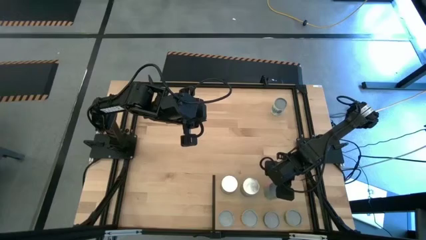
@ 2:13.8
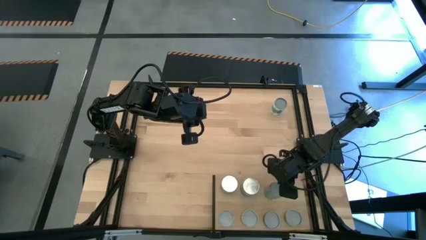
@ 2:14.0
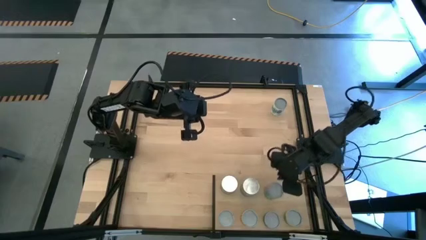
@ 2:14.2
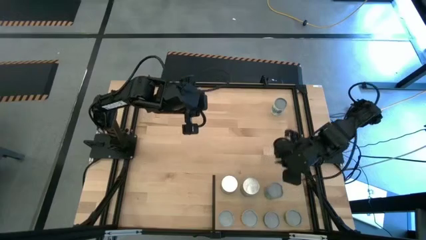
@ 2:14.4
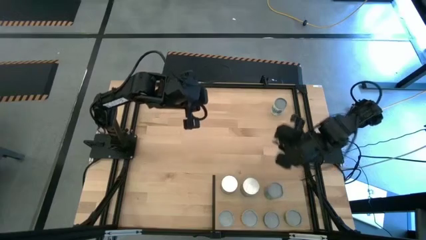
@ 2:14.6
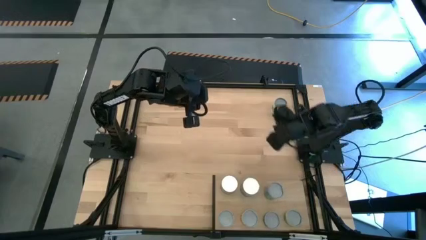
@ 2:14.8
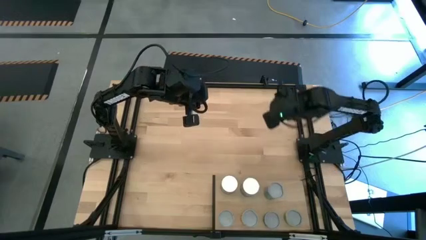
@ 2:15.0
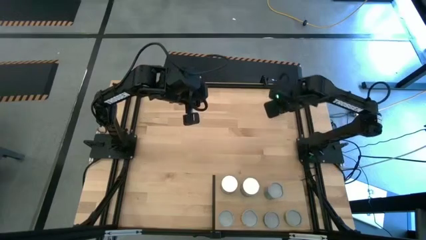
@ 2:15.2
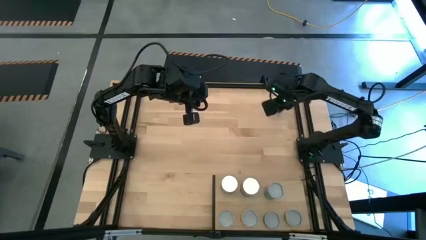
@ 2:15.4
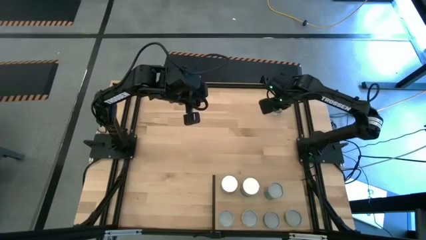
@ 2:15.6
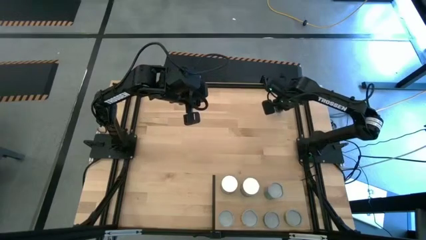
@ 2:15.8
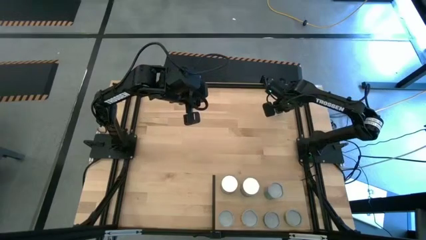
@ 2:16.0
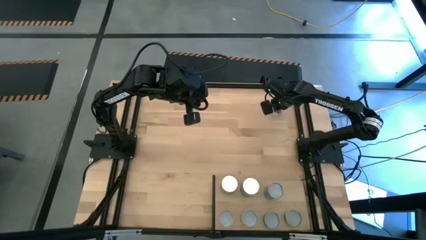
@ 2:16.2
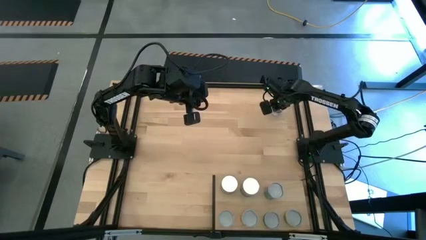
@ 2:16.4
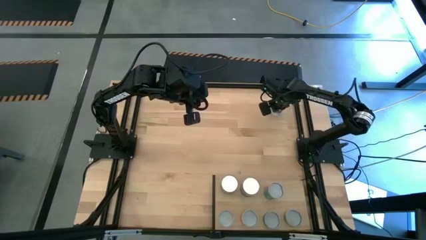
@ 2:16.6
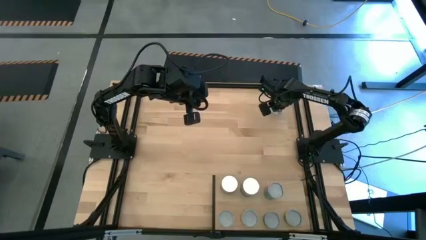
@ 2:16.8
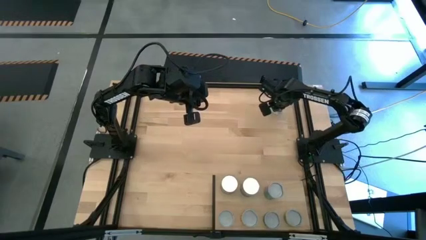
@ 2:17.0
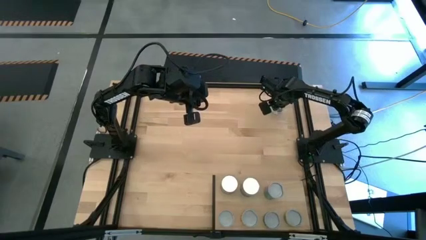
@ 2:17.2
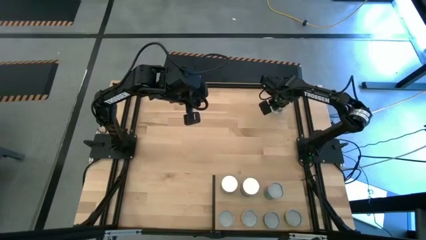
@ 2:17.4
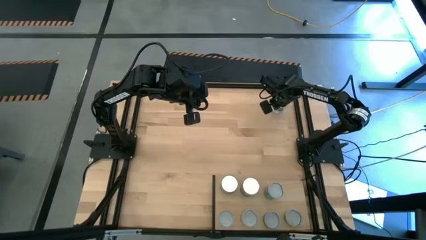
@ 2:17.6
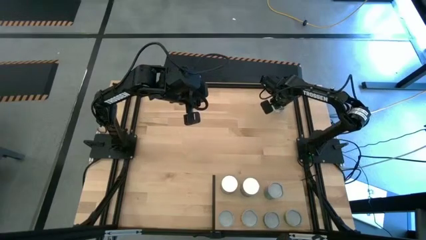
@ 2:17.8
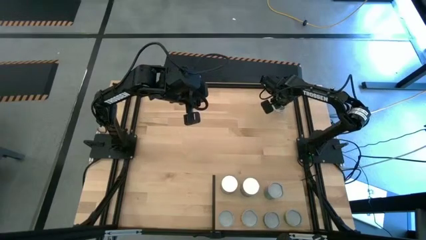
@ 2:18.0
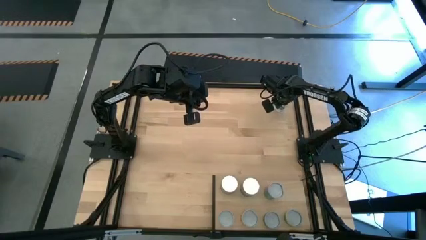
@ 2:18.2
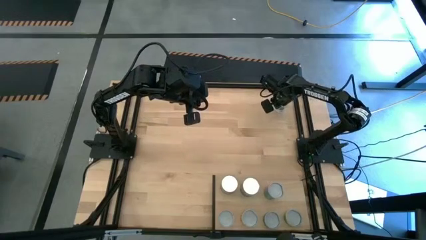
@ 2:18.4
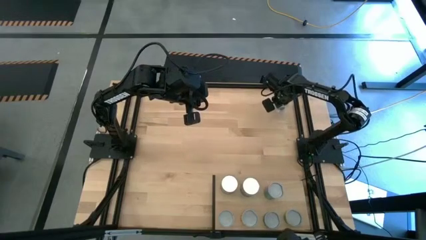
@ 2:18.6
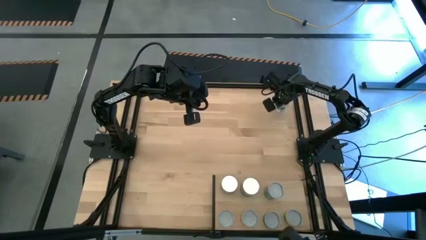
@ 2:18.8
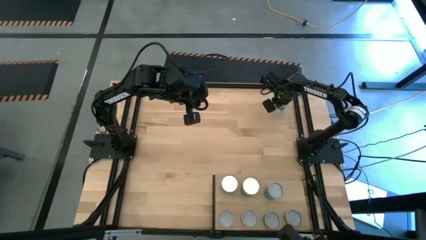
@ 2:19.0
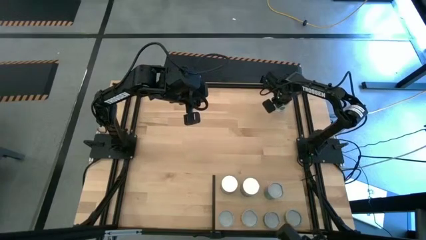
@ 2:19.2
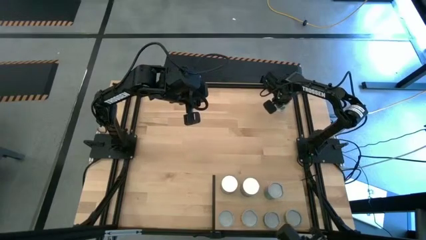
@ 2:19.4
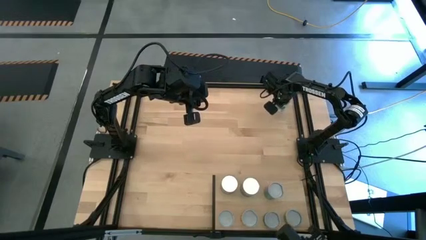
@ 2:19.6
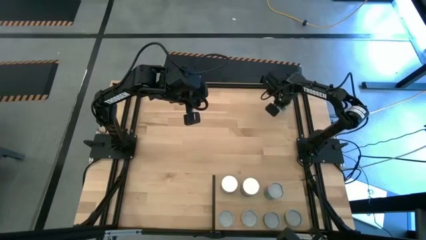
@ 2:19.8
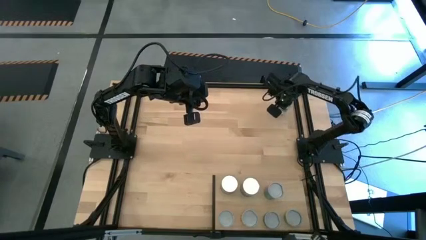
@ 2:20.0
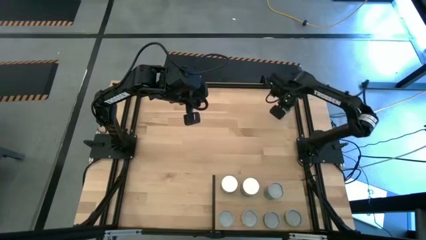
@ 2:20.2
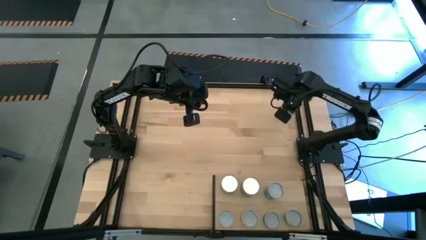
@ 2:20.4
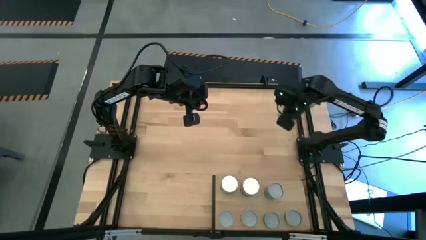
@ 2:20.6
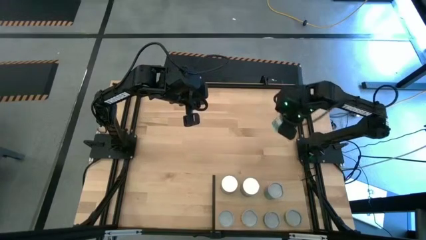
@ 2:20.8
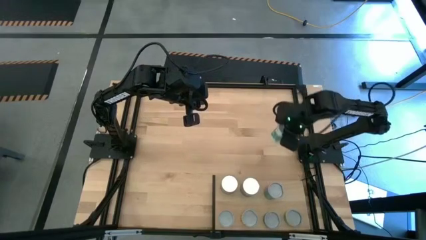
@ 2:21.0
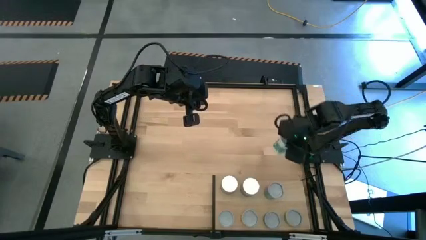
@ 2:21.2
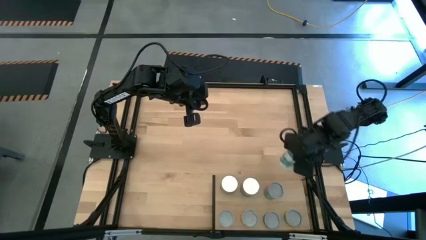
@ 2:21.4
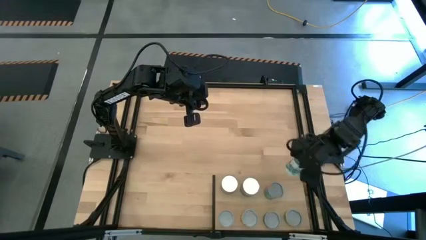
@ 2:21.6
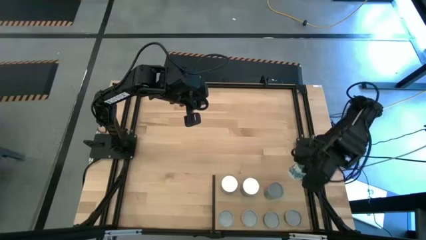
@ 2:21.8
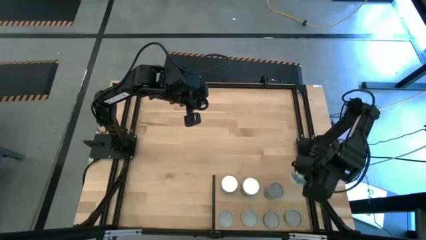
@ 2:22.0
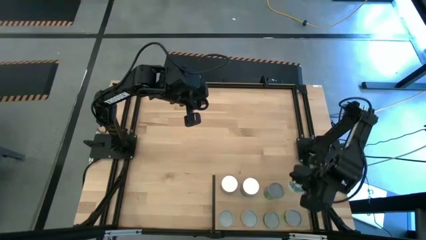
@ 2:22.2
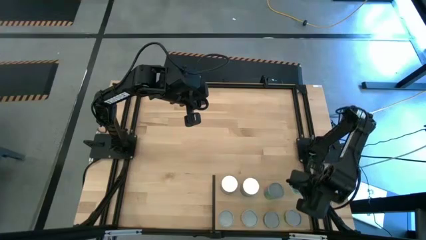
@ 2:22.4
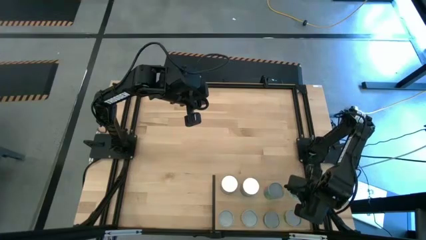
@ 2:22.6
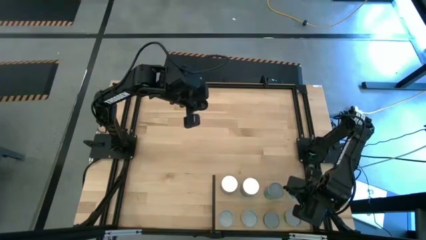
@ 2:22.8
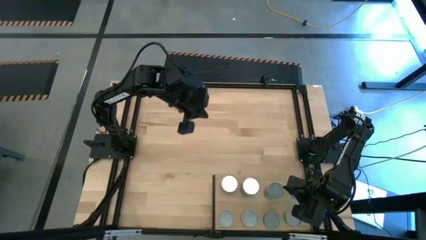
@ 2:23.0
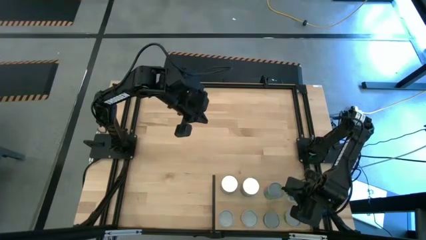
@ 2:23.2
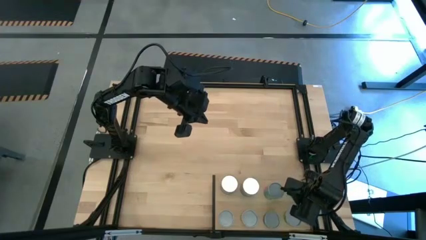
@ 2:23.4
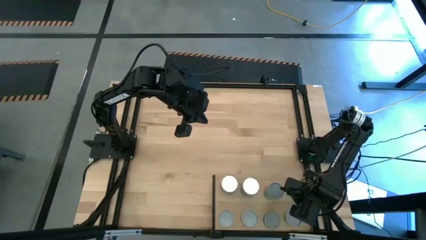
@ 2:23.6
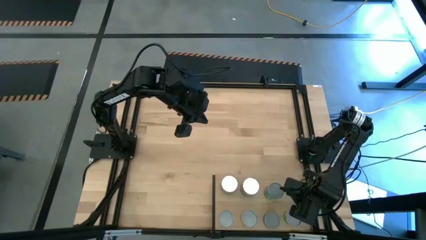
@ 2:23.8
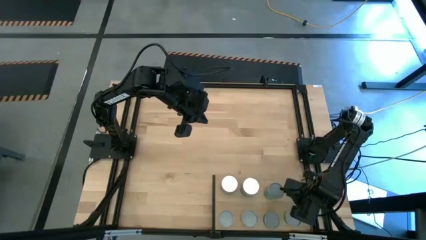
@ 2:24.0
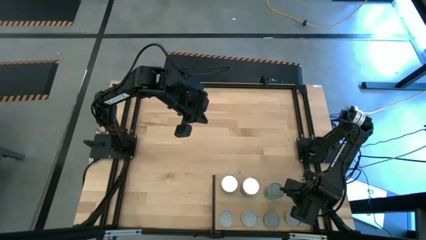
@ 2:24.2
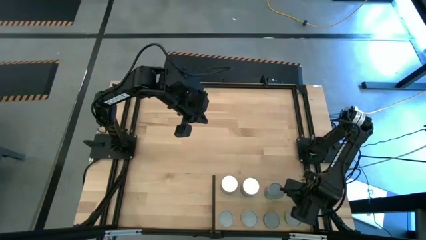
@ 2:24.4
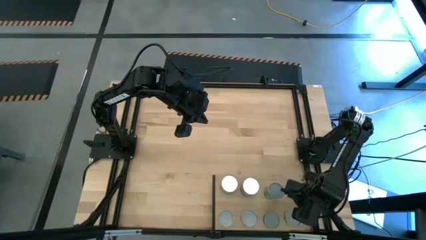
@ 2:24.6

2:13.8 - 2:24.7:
Task: Pick and place cans onto a shelf
Put the canned mix vegetables on the shelf

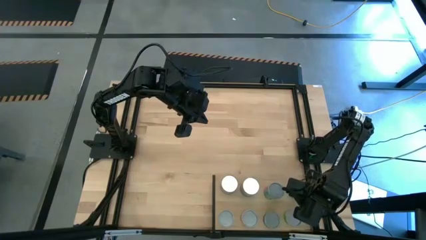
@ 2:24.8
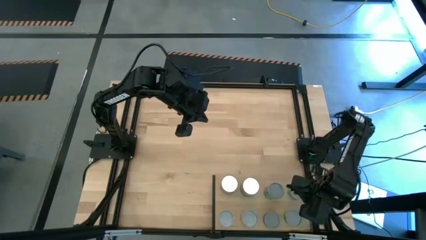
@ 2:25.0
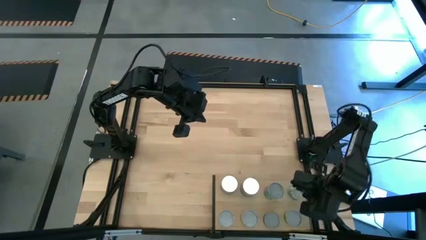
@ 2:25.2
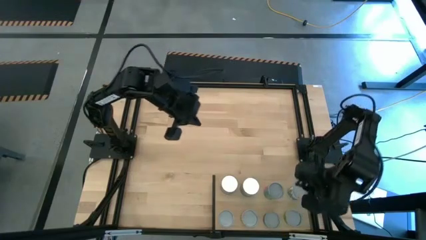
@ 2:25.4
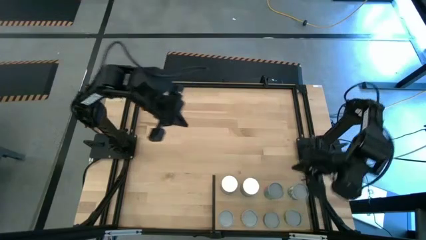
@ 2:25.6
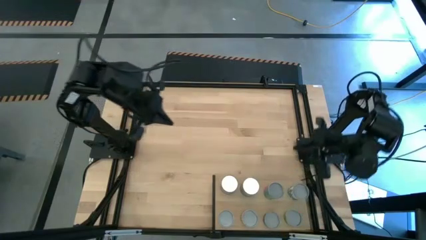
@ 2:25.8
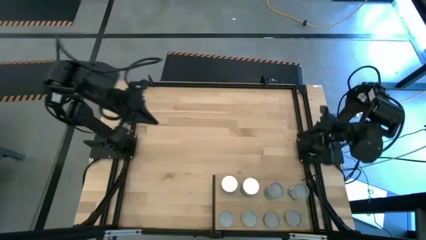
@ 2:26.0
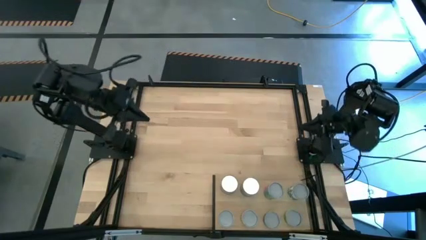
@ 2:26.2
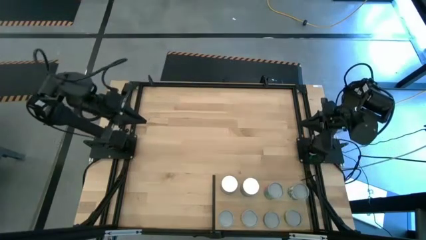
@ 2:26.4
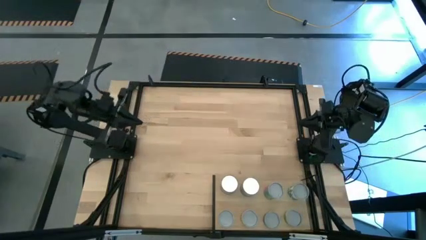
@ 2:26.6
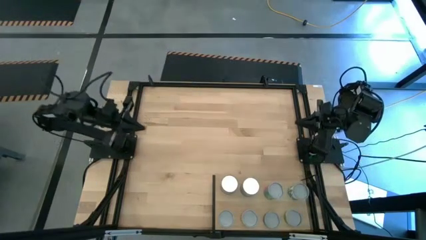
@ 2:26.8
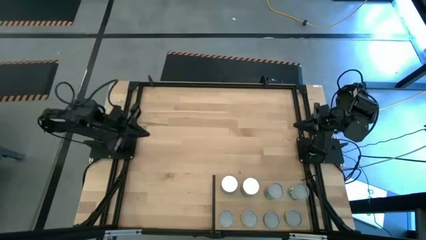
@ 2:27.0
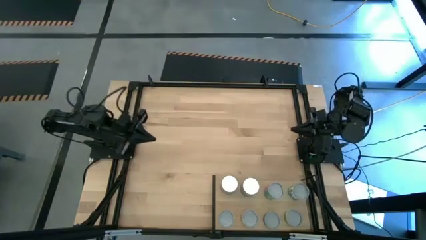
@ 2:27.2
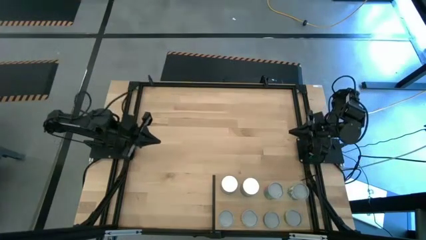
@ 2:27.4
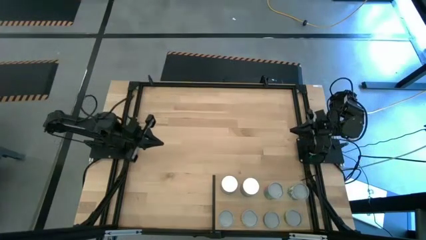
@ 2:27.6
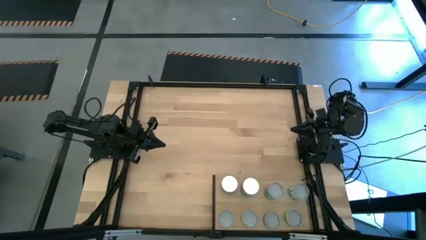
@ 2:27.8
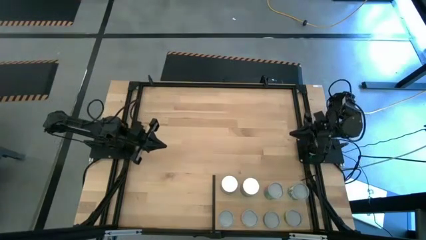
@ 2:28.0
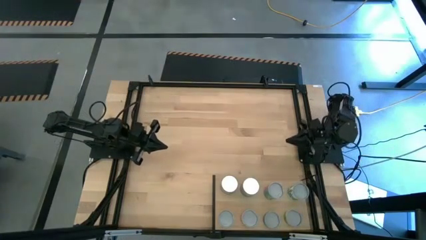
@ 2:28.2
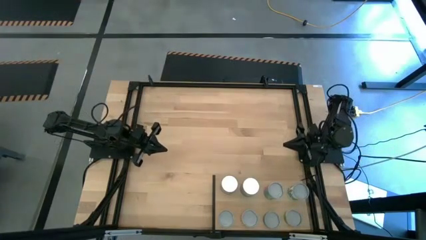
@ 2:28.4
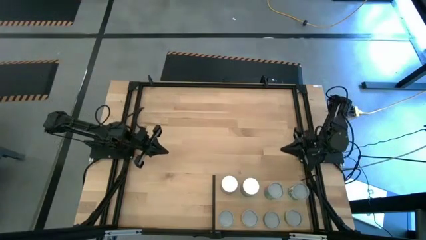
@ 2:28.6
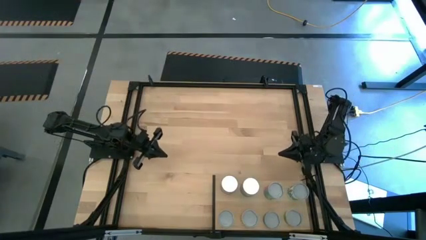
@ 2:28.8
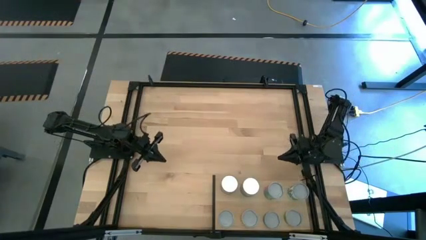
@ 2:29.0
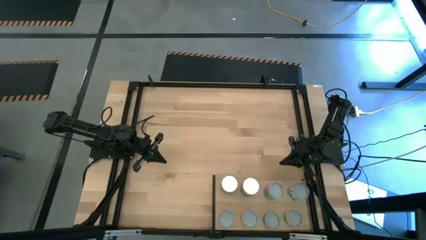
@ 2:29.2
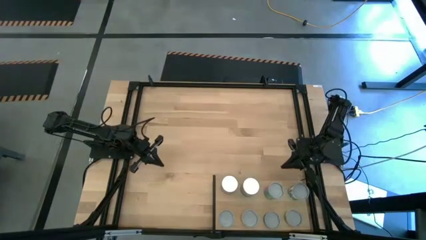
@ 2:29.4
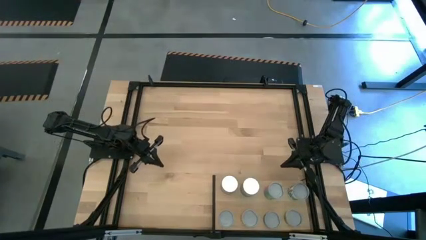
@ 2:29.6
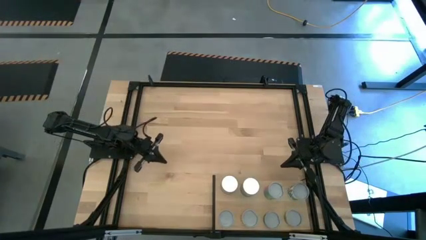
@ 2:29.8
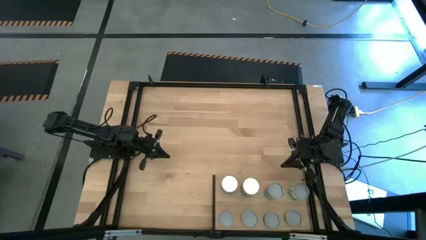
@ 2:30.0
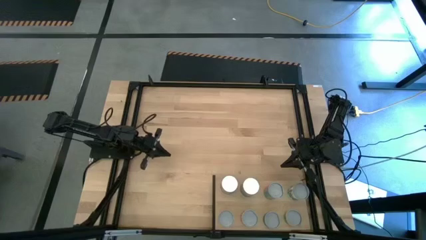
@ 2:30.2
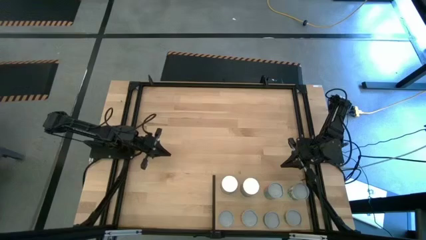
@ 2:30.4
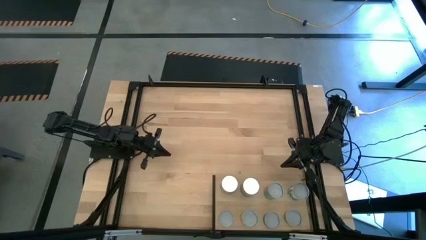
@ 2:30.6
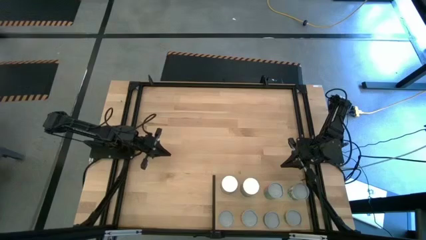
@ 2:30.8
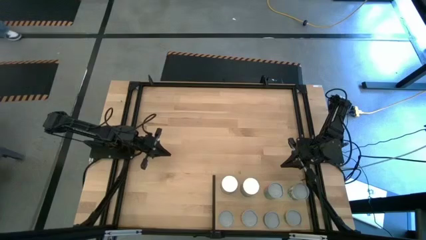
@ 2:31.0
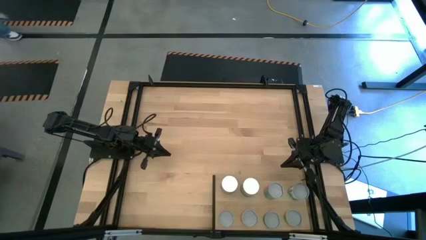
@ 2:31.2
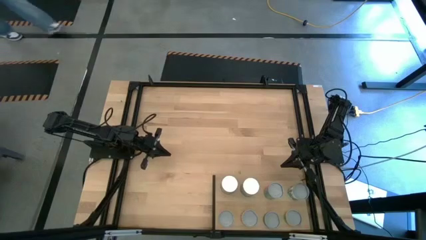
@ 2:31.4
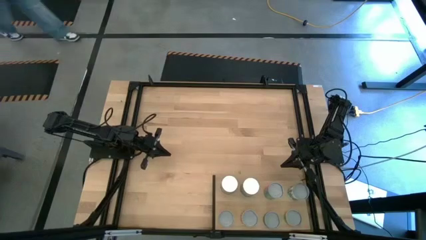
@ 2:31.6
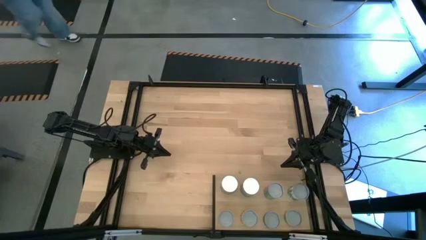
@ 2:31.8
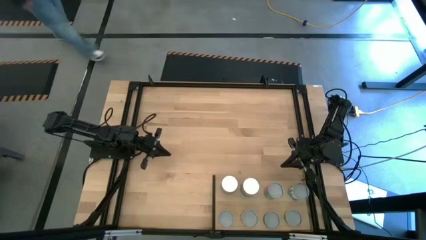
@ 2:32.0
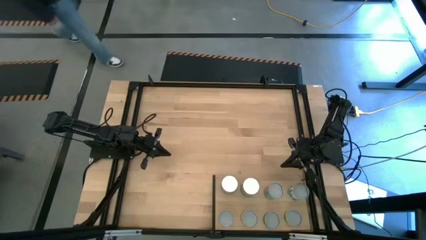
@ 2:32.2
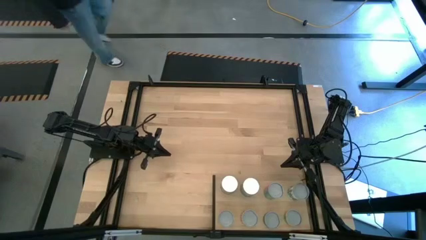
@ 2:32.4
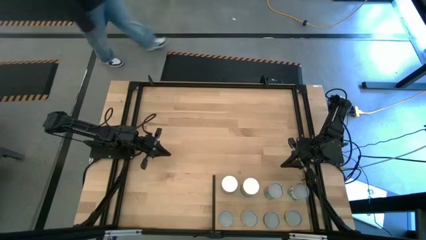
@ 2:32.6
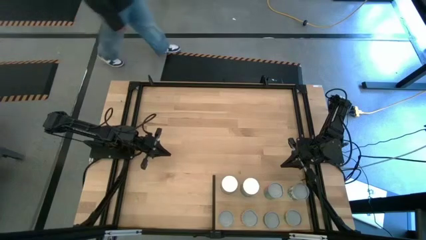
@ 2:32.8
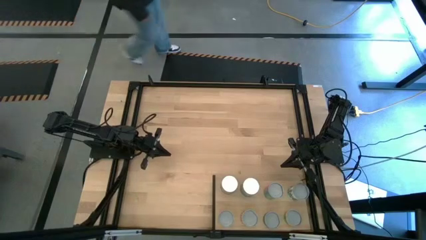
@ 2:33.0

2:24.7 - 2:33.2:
Return to Home Position
